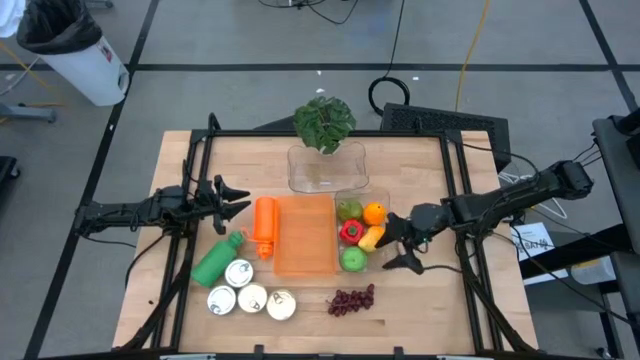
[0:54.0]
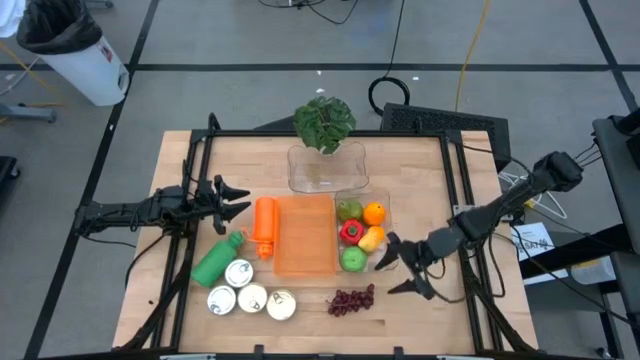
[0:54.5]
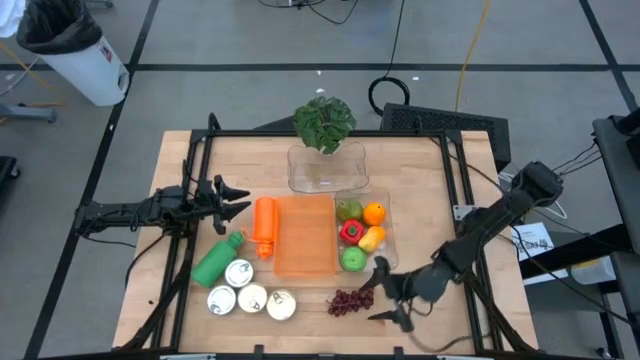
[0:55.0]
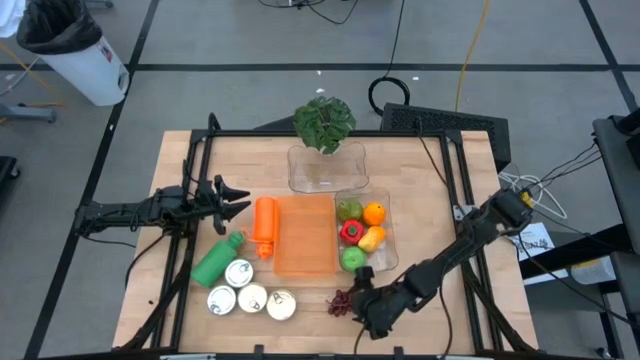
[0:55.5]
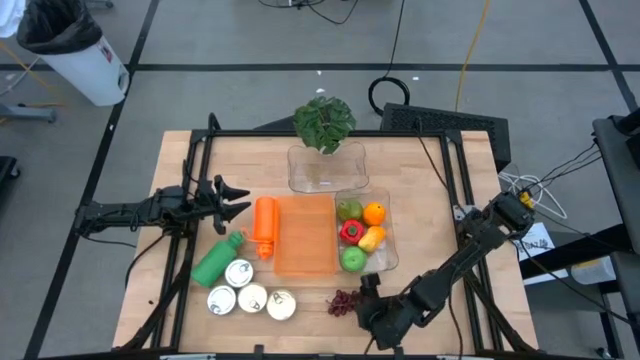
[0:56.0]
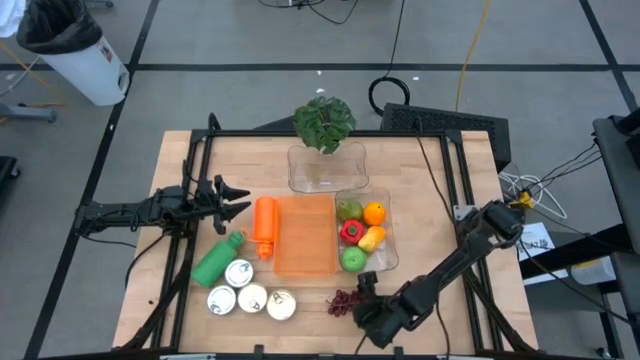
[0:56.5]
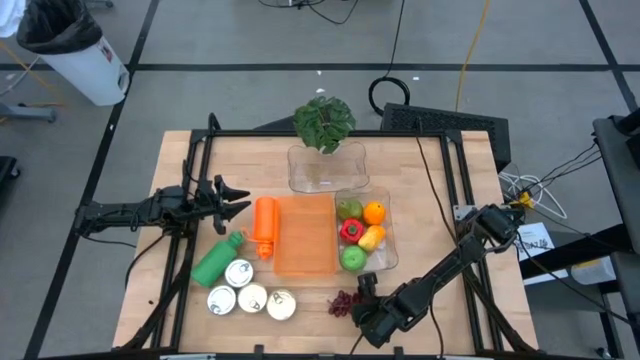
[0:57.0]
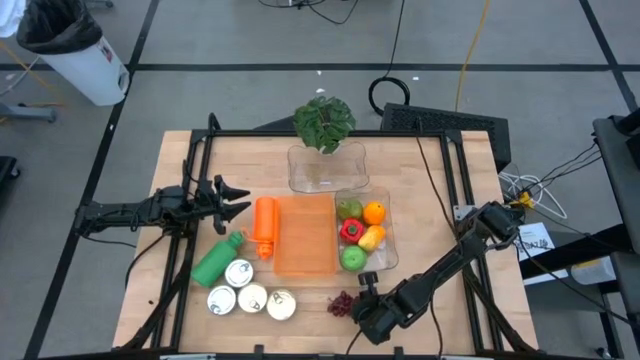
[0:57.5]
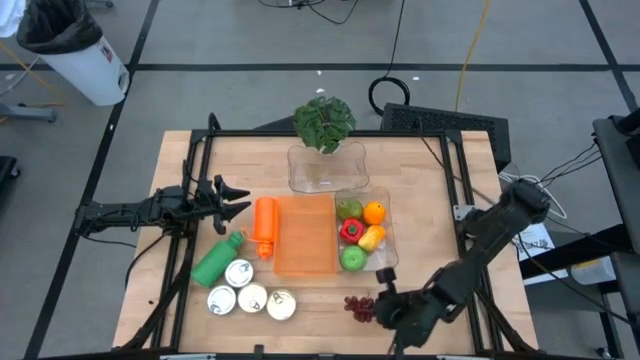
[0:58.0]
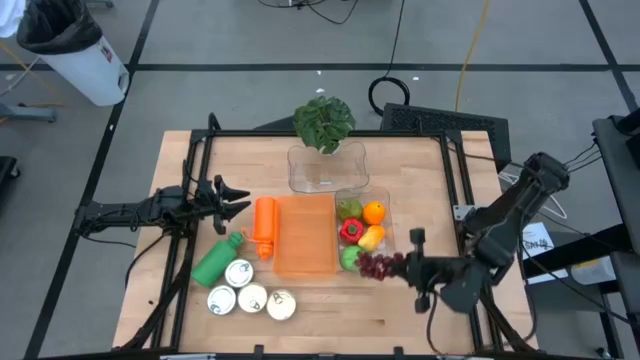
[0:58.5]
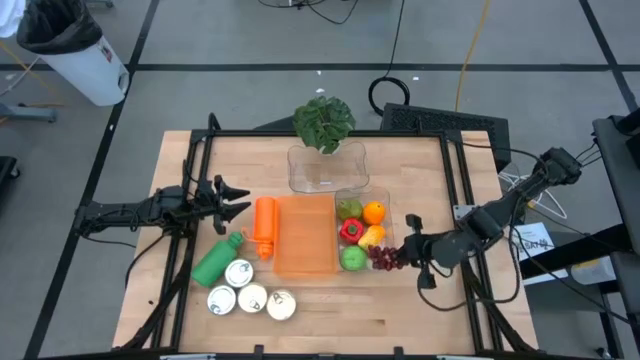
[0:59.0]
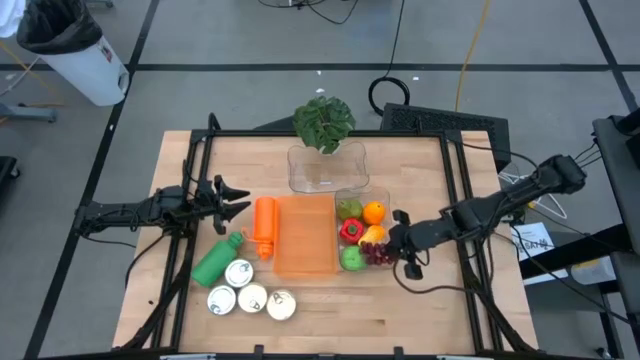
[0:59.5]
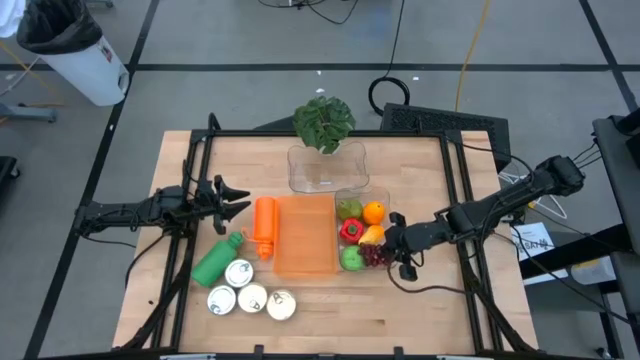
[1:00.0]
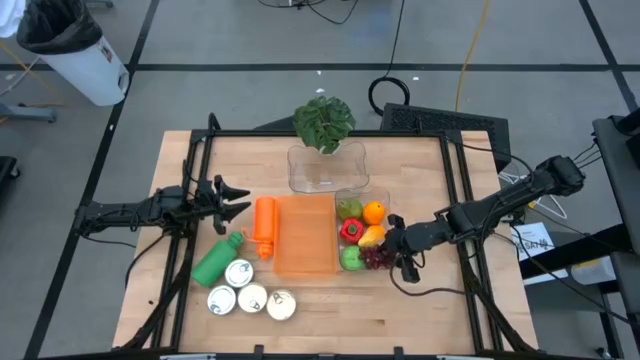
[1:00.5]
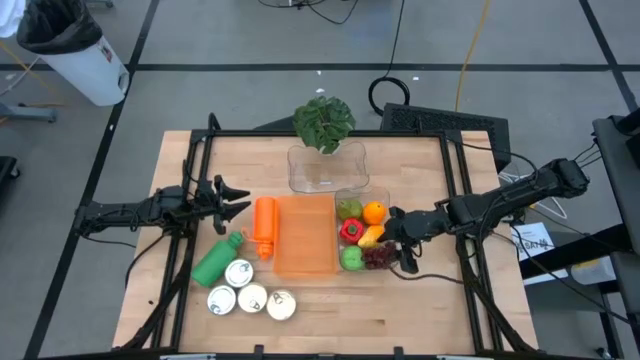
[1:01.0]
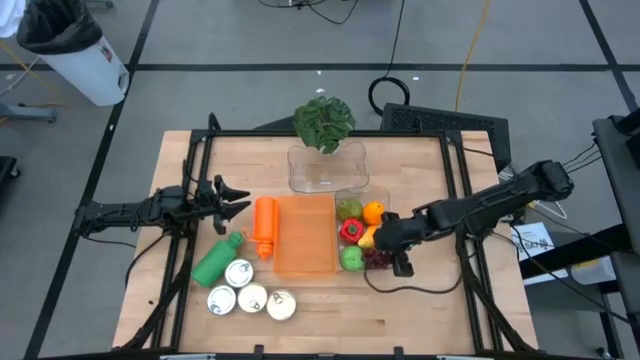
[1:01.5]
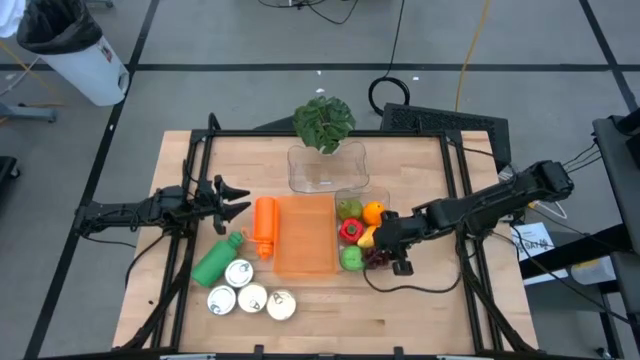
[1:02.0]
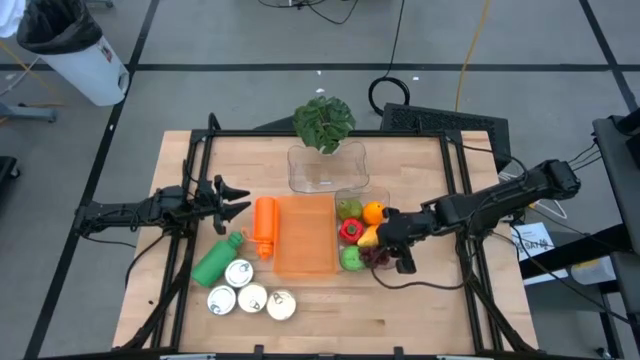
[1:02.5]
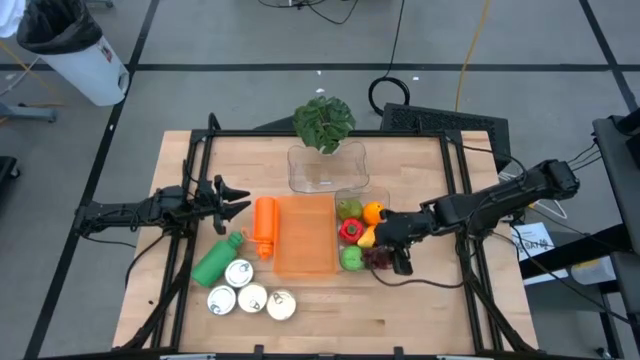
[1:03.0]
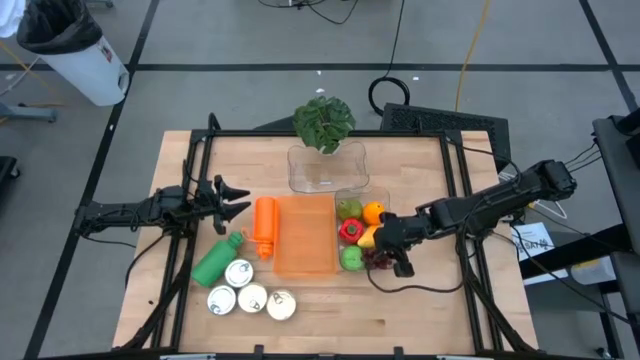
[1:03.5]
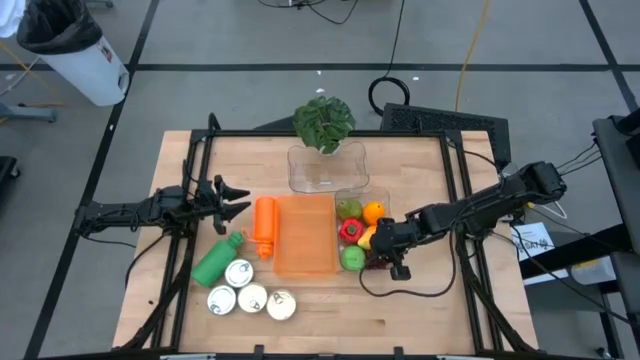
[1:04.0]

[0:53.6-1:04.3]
Task: Pick & Place Food Item
Put the red grapes into the bottom transparent bin

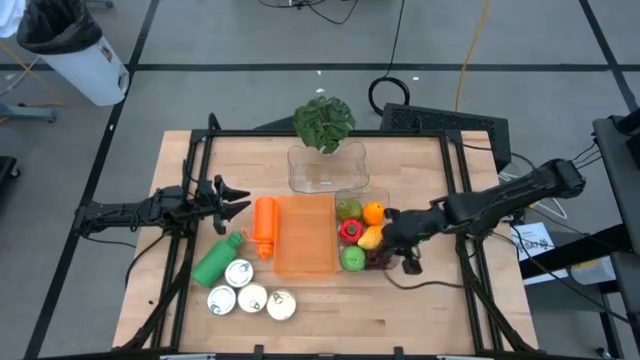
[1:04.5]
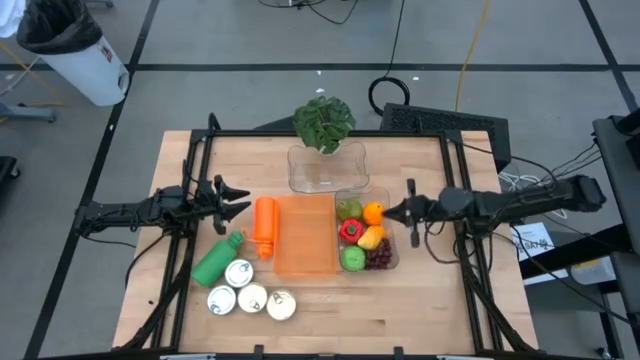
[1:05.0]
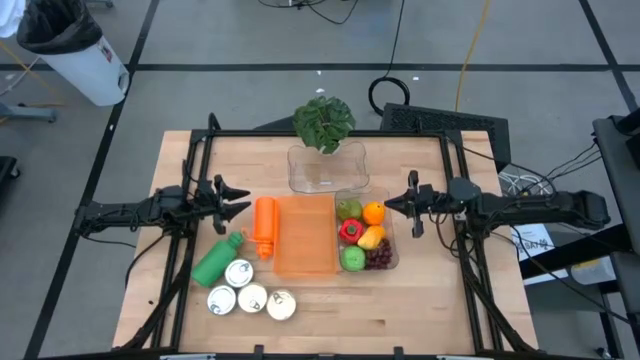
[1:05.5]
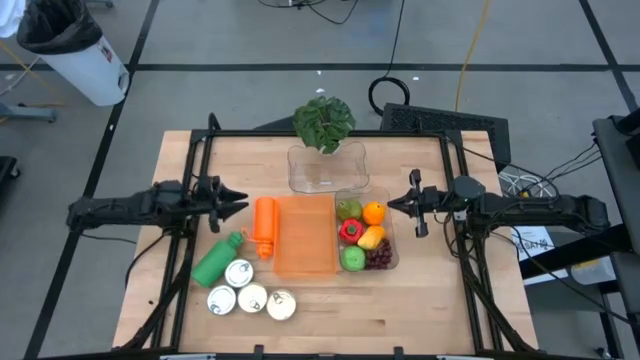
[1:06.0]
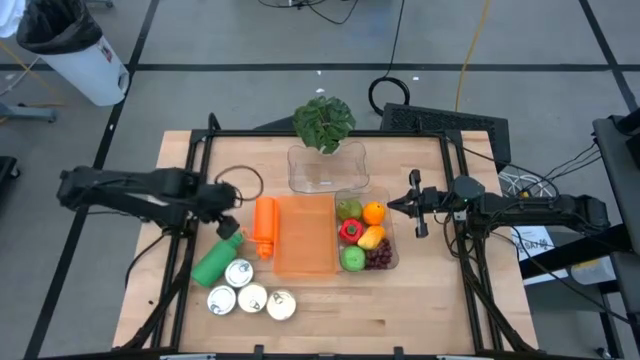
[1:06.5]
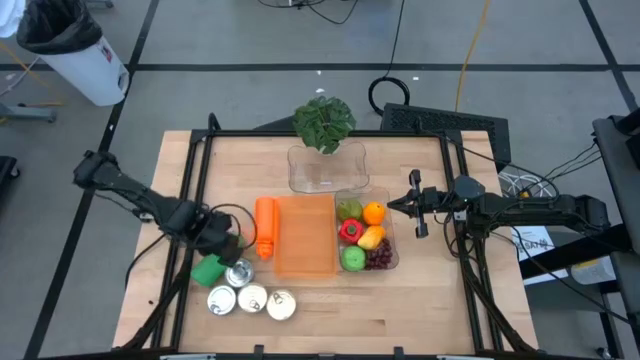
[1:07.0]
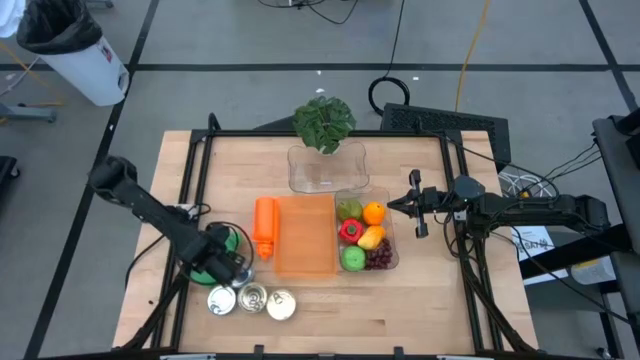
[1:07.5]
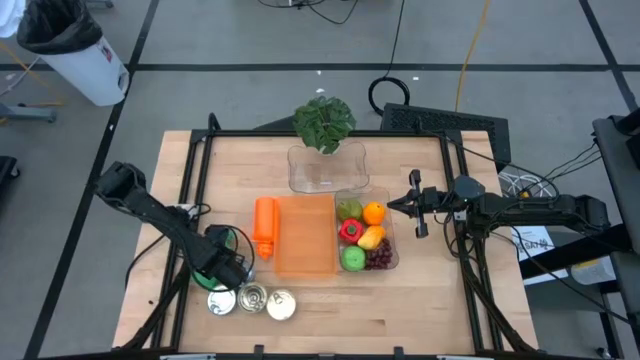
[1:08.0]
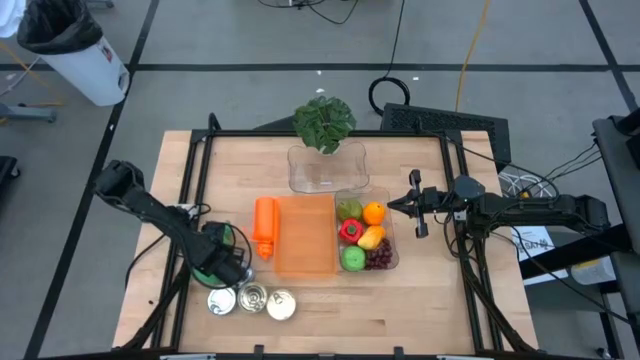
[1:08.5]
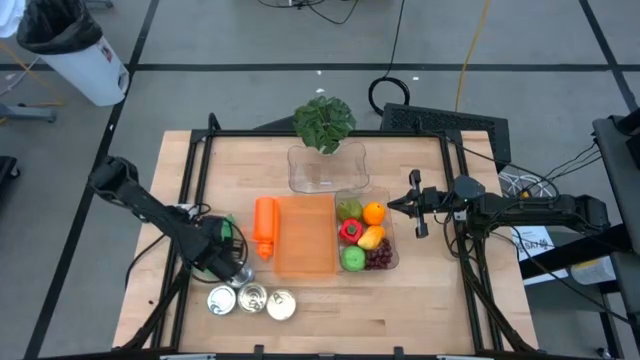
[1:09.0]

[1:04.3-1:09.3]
Put the green water bottle into the top transparent bin

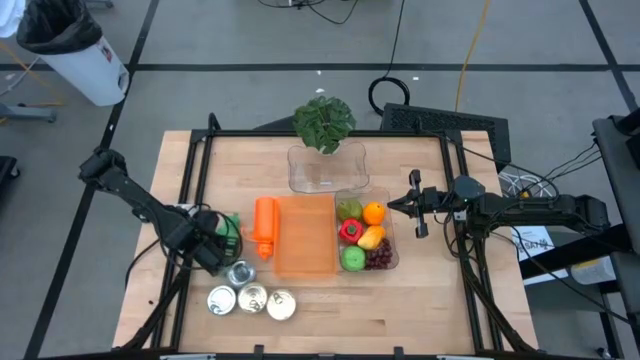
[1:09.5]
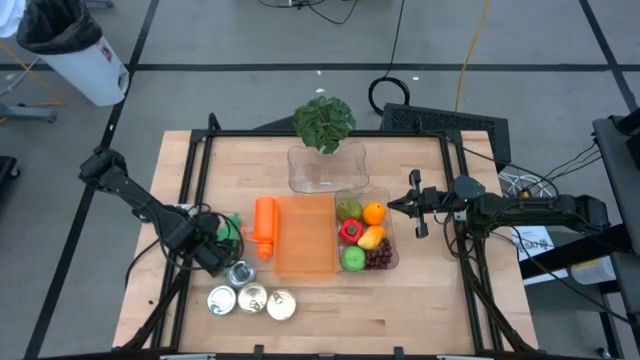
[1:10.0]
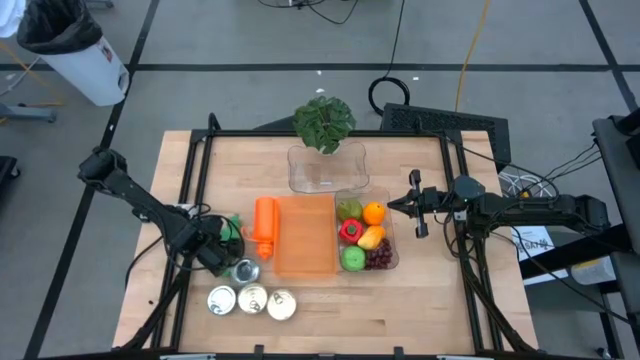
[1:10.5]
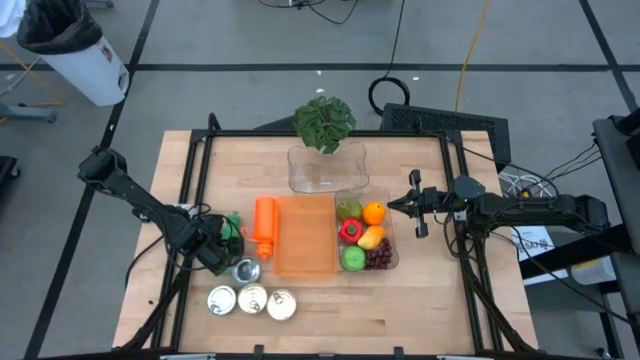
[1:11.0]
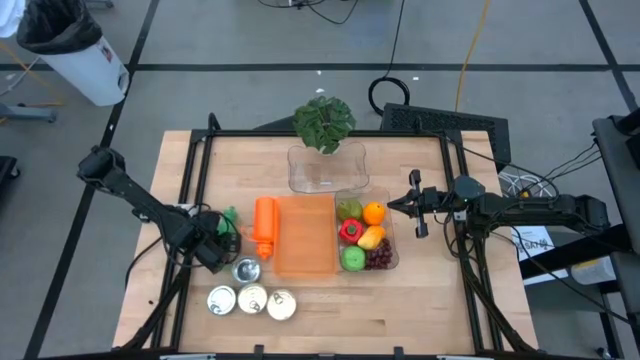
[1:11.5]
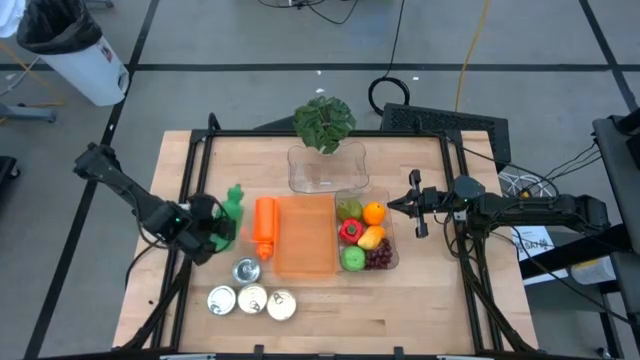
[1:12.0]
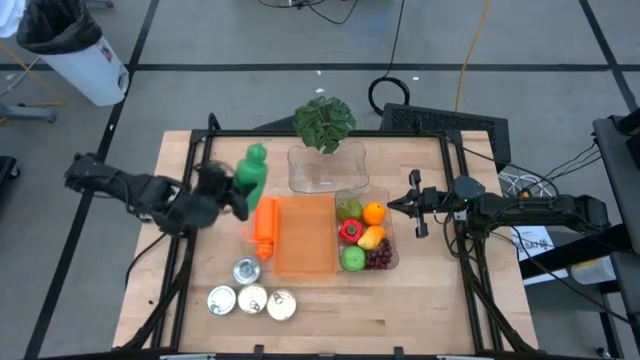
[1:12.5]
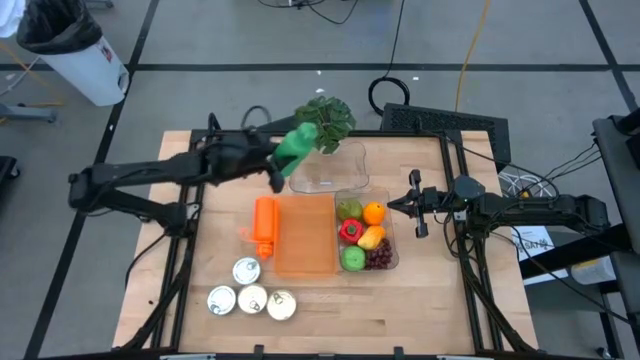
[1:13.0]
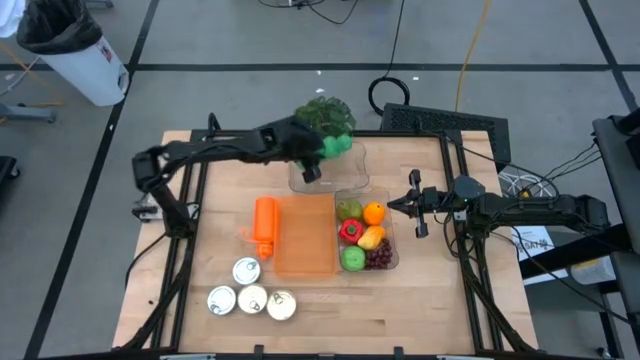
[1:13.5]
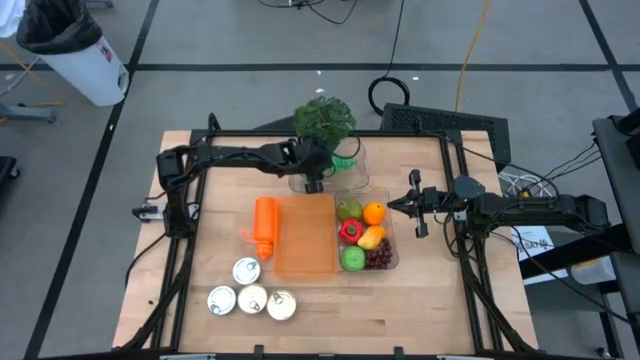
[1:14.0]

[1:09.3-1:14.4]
Put the green water bottle into the top transparent bin
